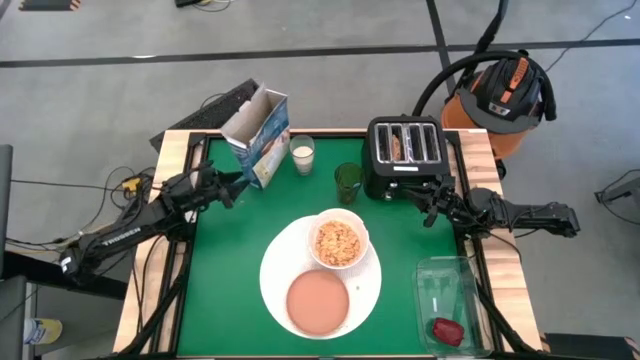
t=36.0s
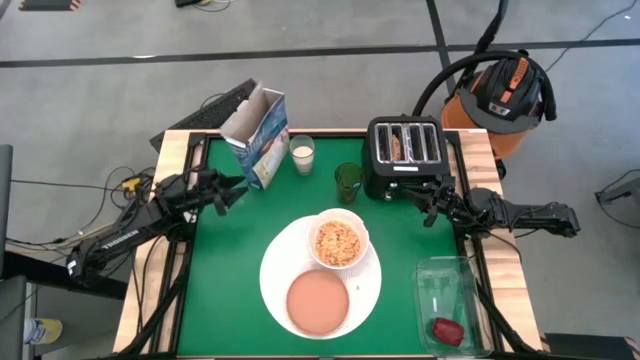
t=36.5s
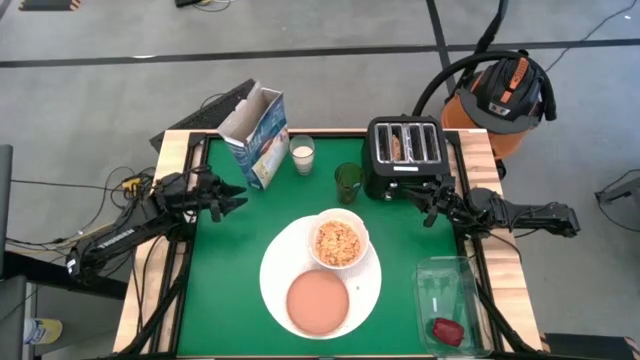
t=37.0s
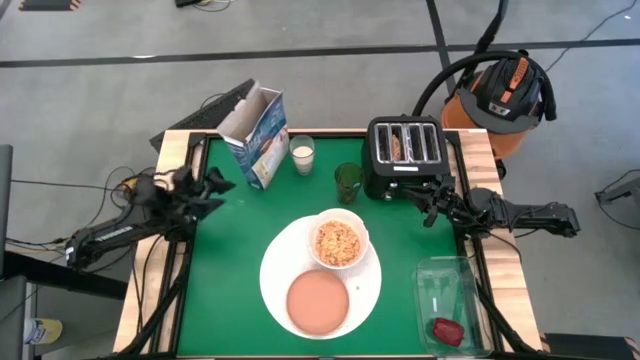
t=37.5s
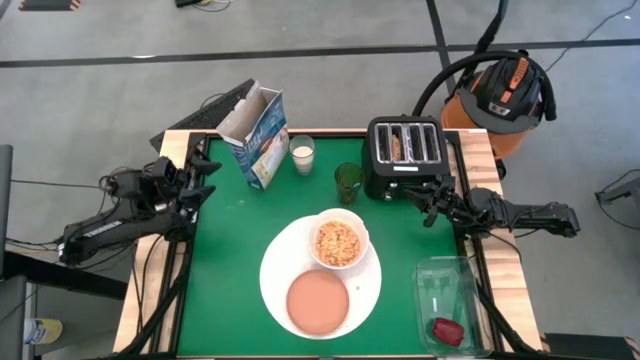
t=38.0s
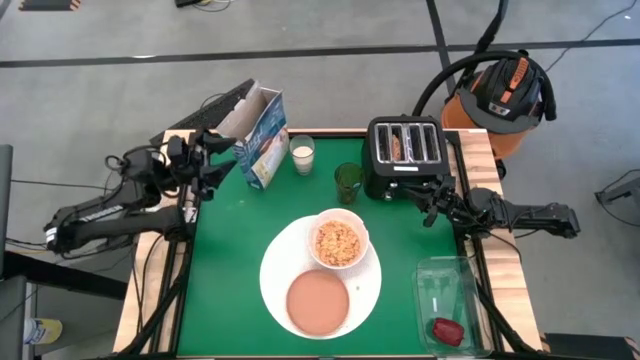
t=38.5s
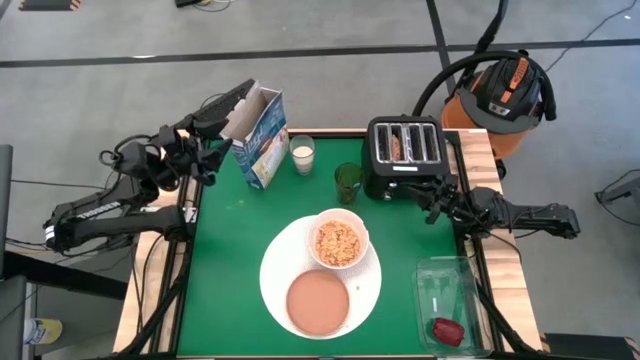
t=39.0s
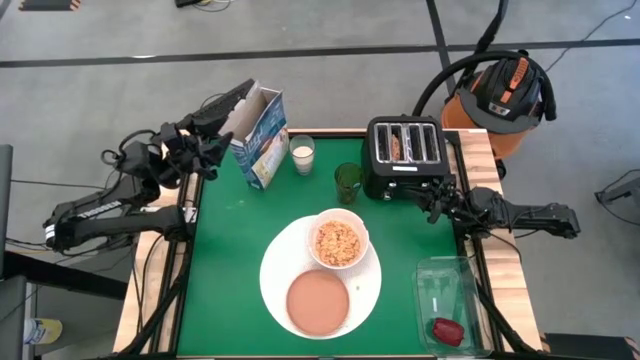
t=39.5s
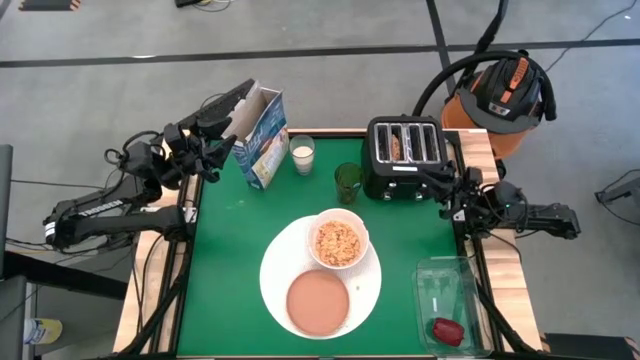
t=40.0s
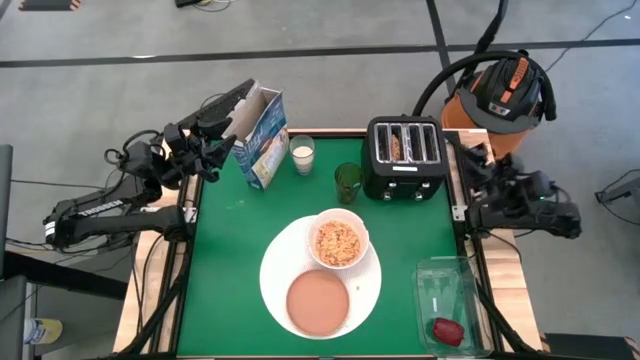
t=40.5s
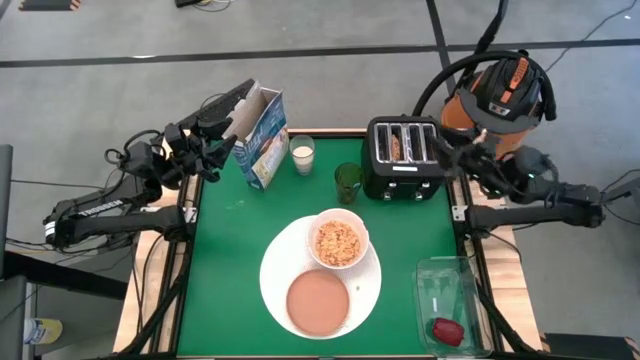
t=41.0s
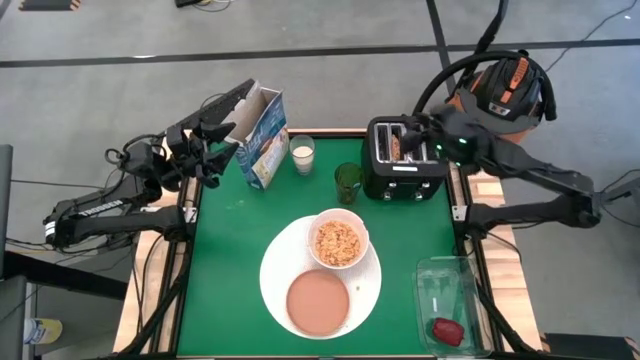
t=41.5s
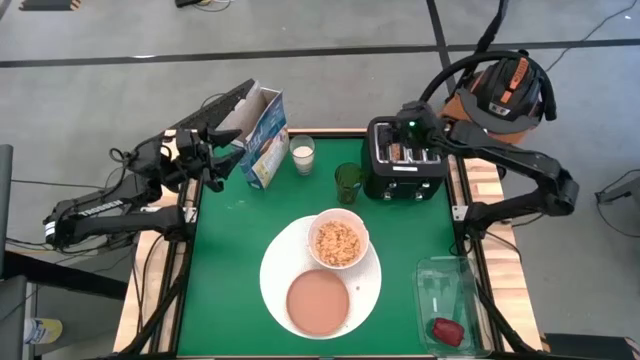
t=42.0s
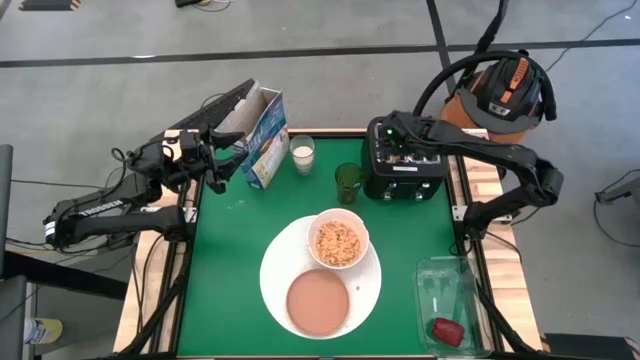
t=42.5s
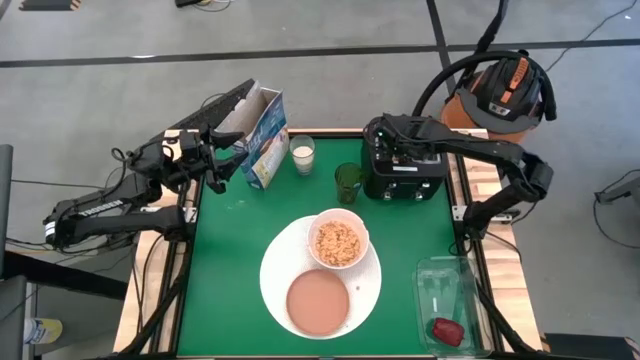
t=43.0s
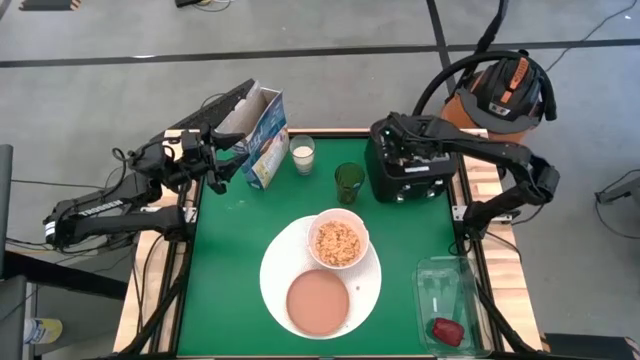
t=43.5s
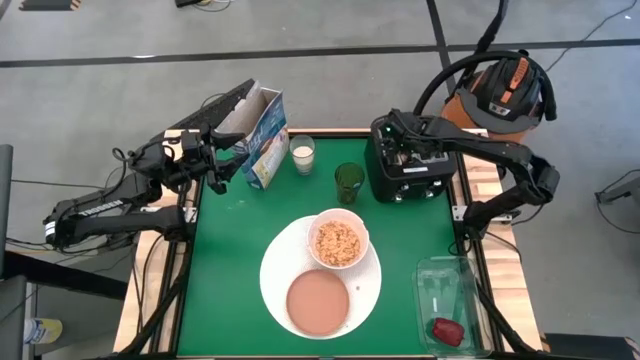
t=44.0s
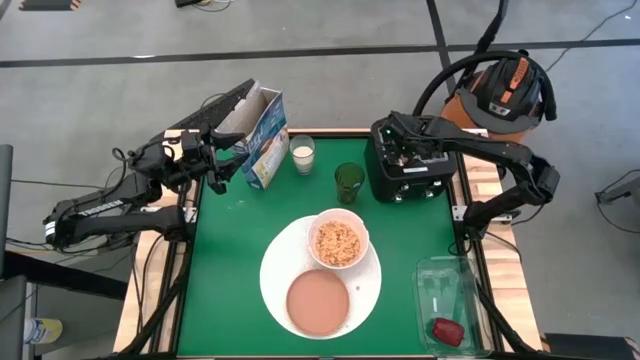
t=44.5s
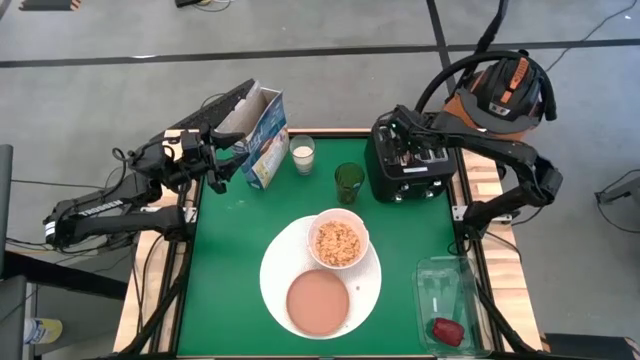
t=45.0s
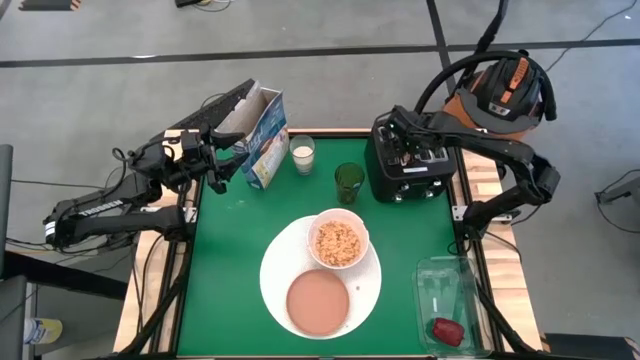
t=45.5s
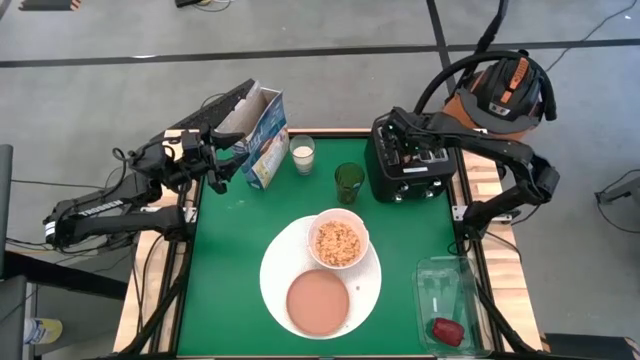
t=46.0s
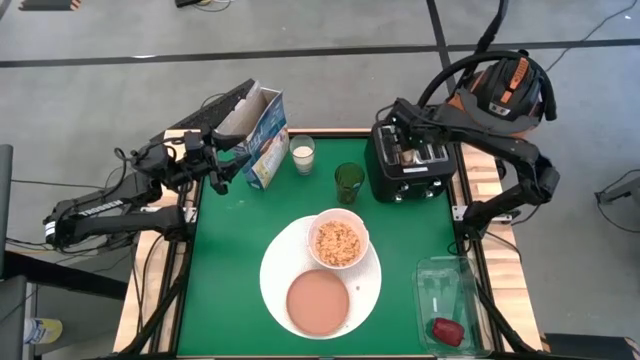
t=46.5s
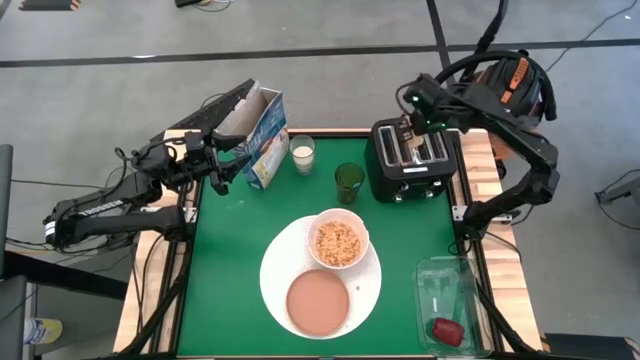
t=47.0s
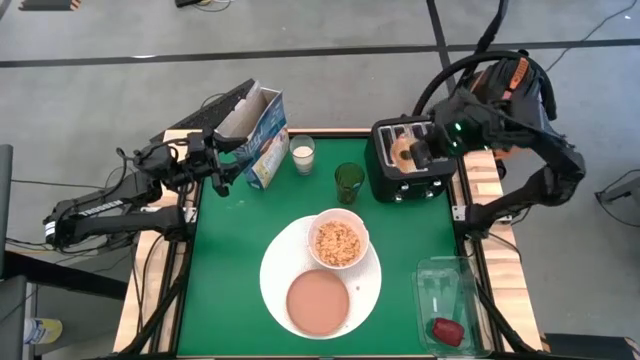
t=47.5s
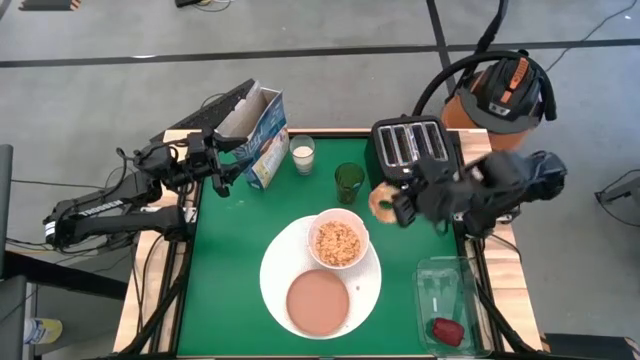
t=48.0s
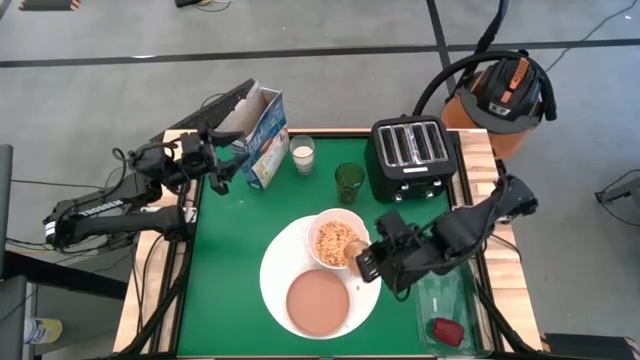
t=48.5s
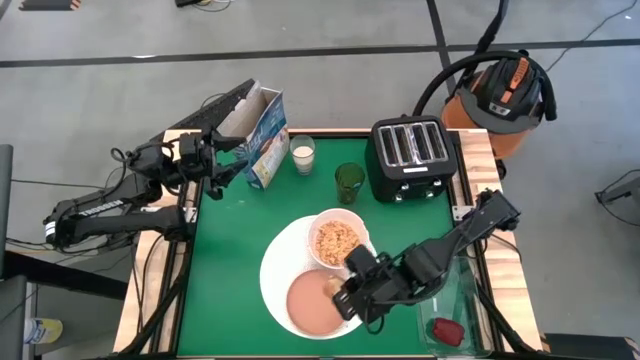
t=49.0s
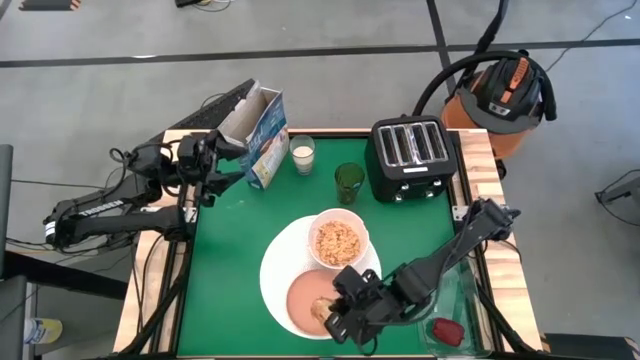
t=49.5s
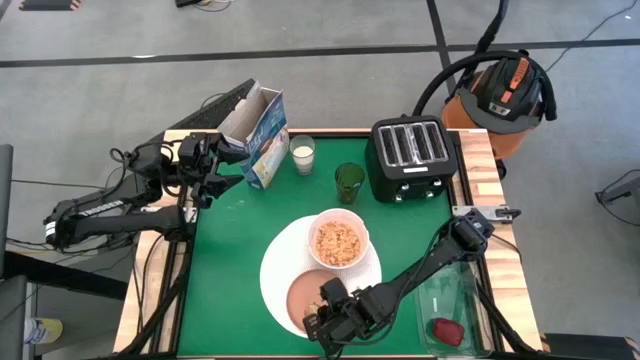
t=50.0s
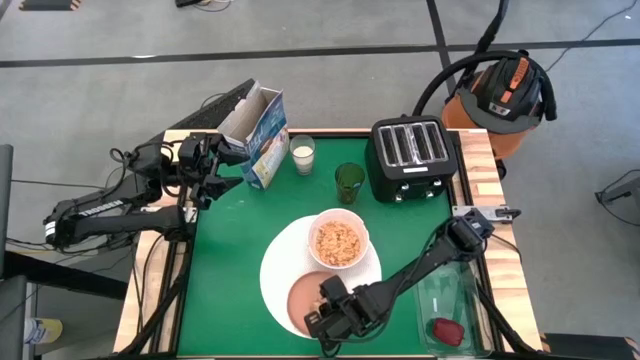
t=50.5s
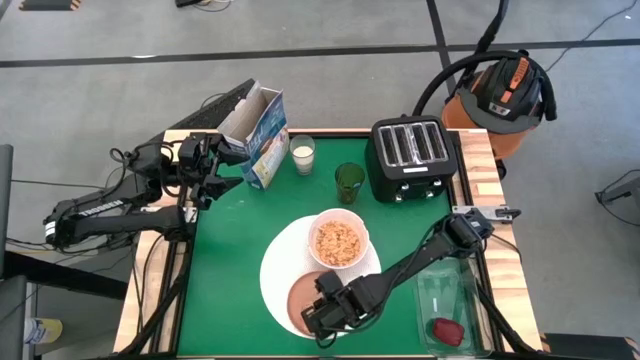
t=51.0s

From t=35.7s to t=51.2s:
Task: Arrange a breakfast setting
Put the toasted bagel from the toaster into the orange plate

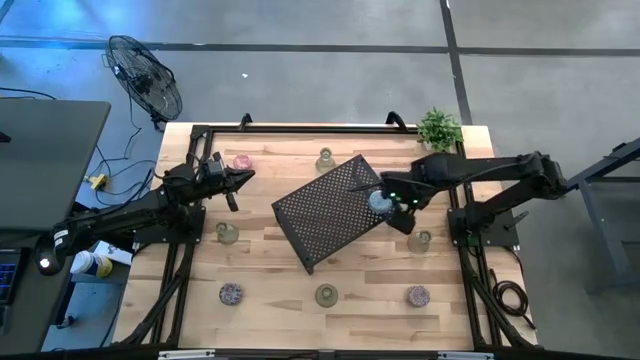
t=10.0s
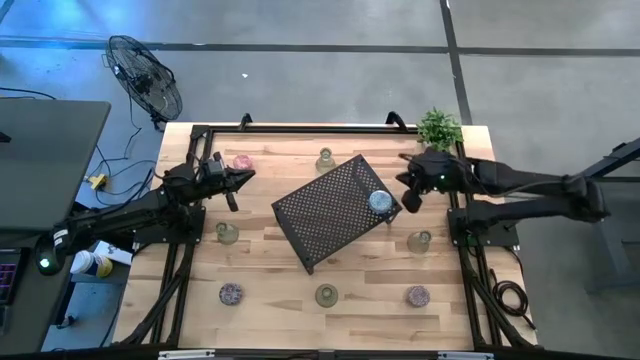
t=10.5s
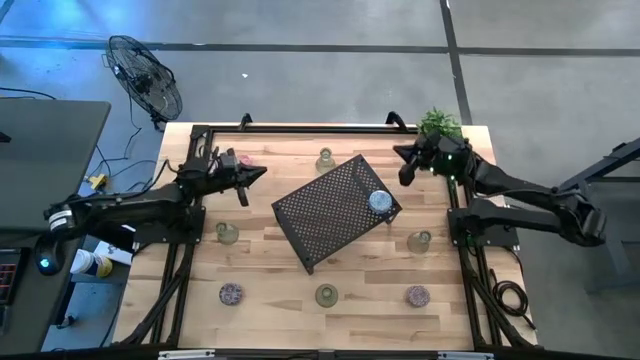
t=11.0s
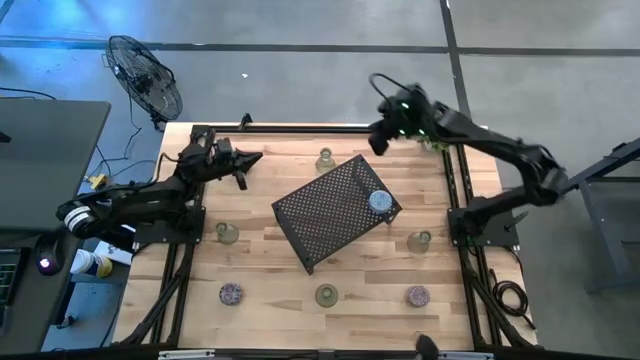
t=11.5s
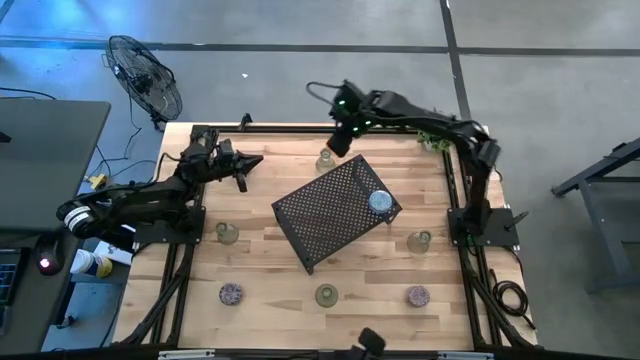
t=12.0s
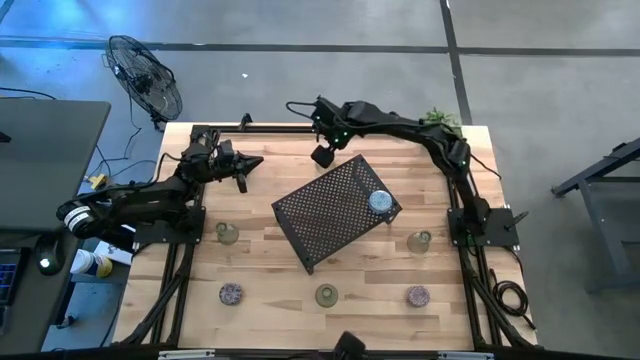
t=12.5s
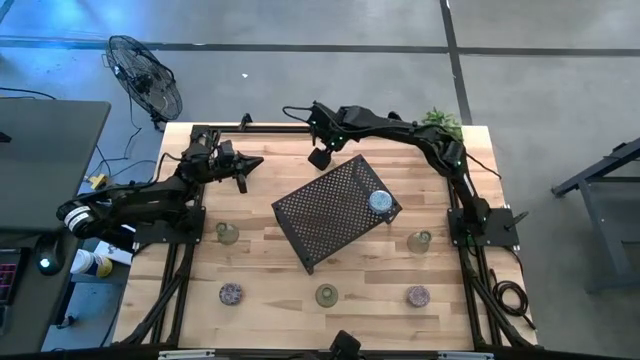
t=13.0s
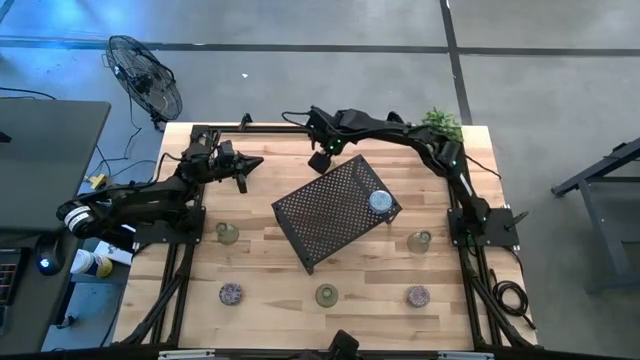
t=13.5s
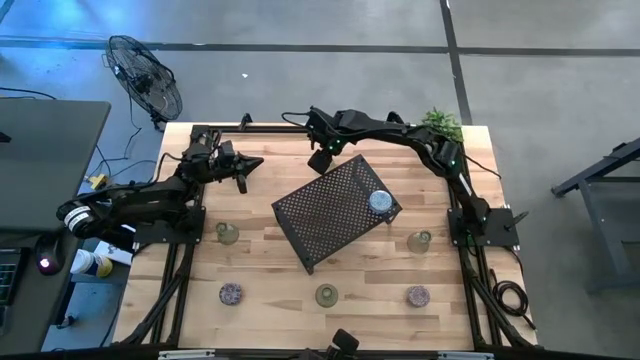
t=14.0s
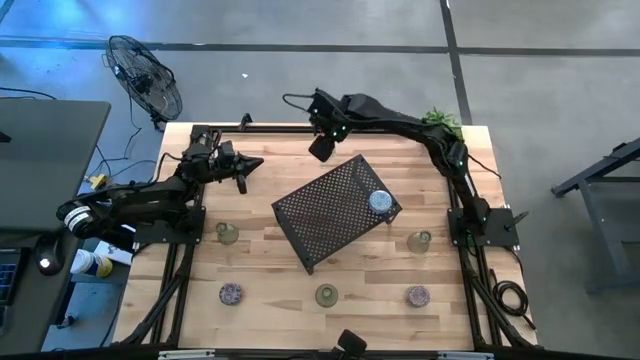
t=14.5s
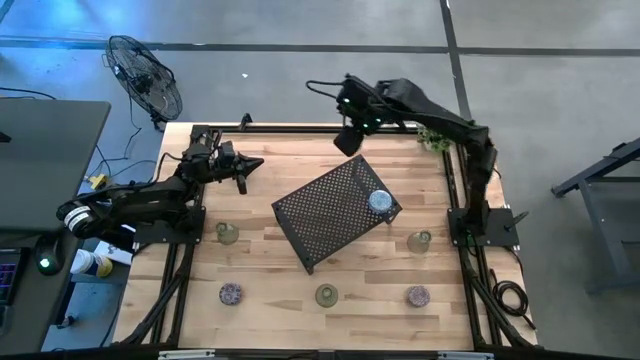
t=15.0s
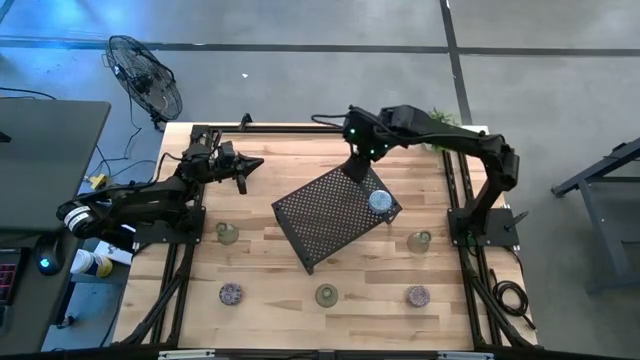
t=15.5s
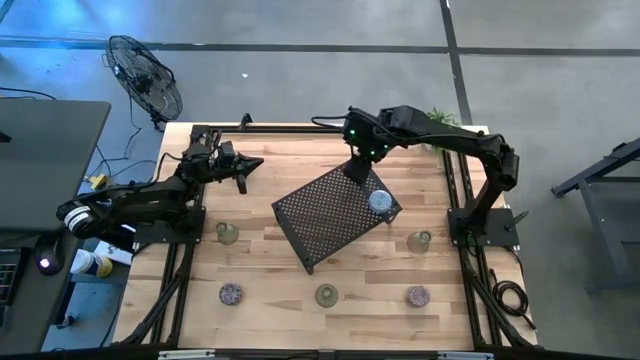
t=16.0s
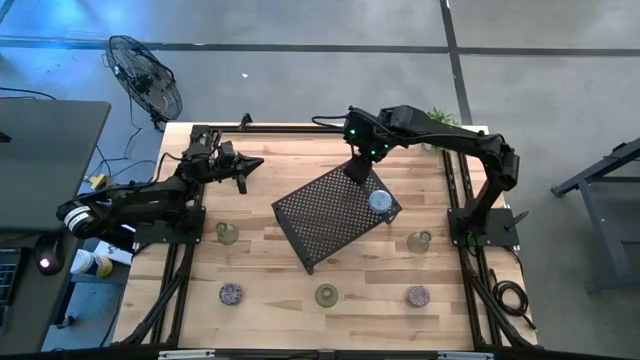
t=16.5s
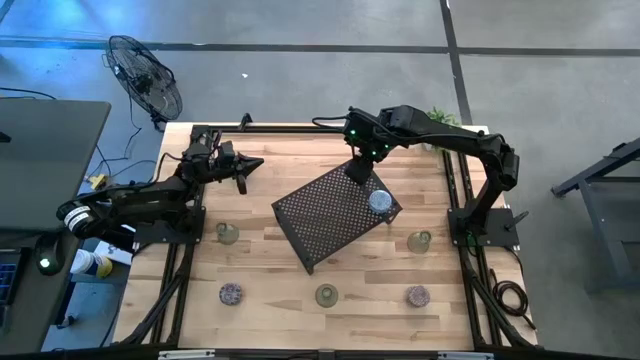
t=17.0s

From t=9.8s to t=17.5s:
Task: Pick & Place candle stick holders
Put the green glass candle holder on the shelf
